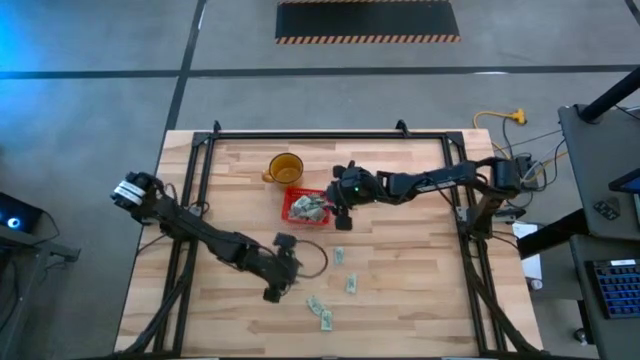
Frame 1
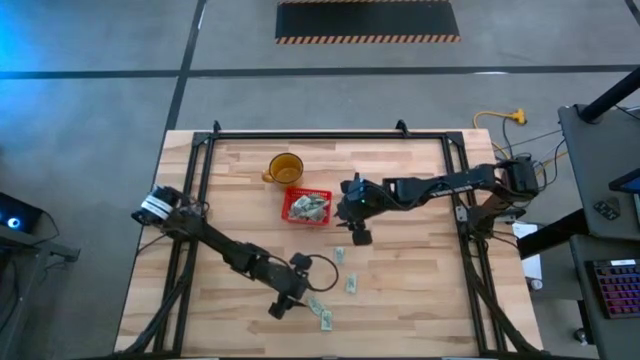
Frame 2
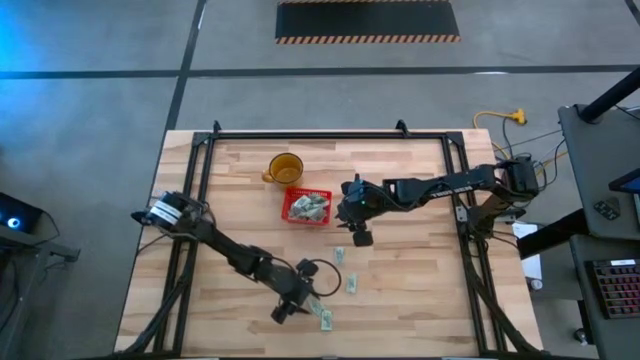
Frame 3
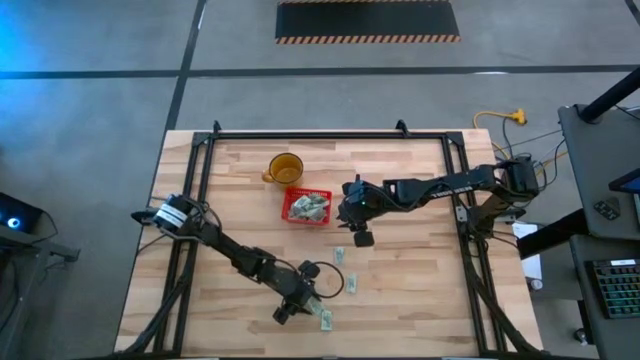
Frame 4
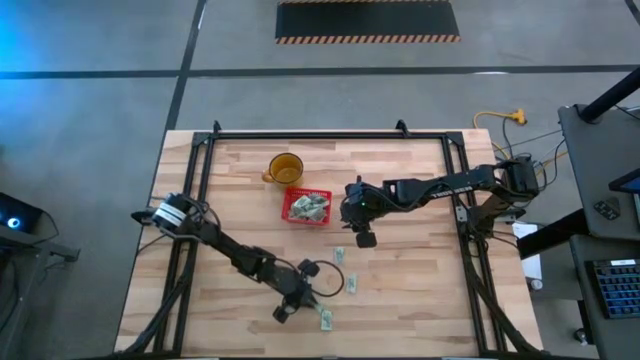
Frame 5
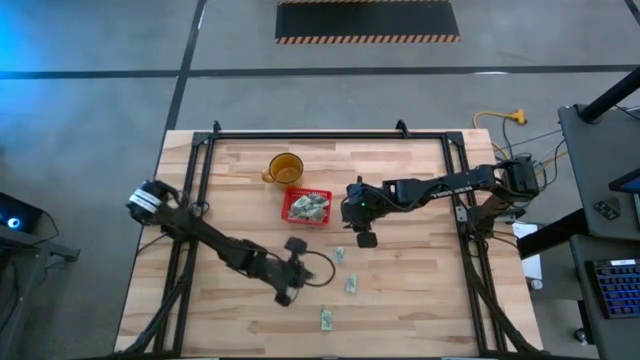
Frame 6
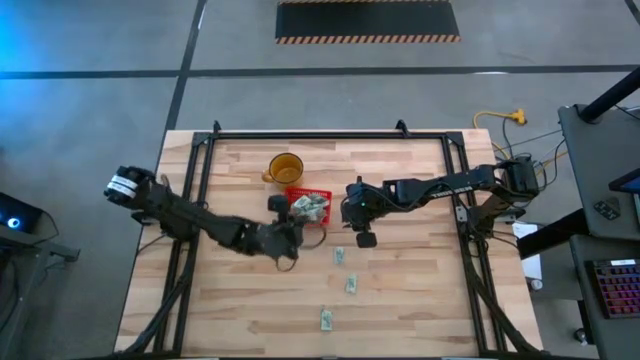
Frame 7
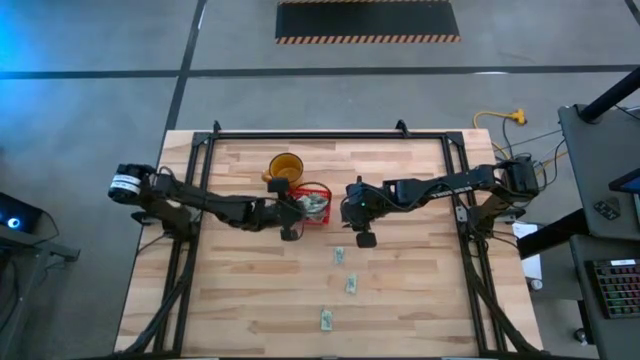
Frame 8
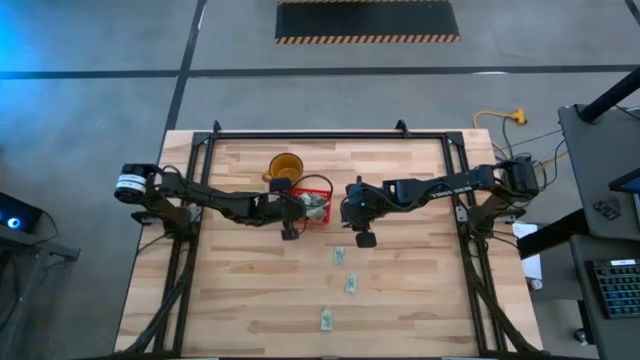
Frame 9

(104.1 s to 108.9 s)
Task: Pick and place Stevia / Truvia into bins
Put the gray stevia packet into the red basket

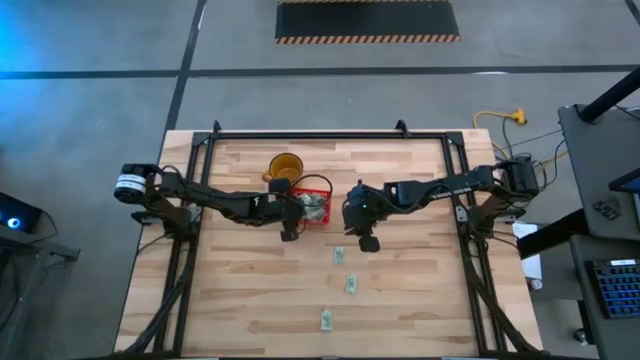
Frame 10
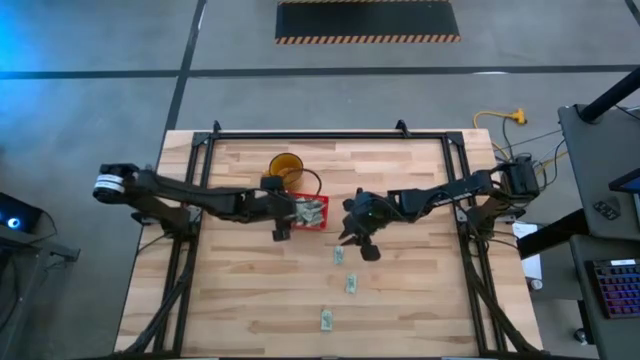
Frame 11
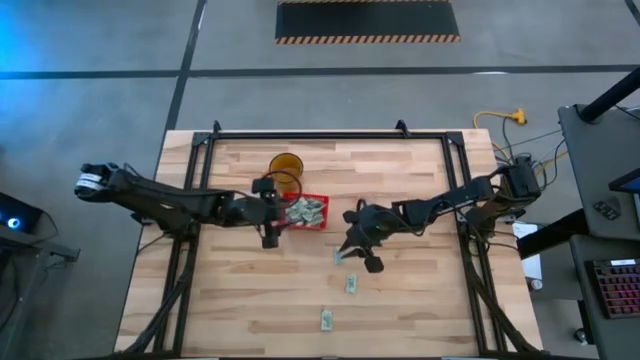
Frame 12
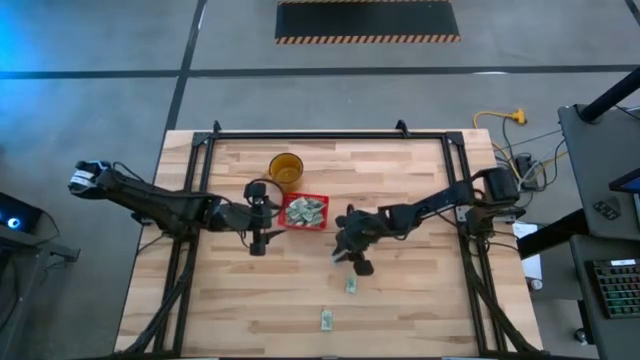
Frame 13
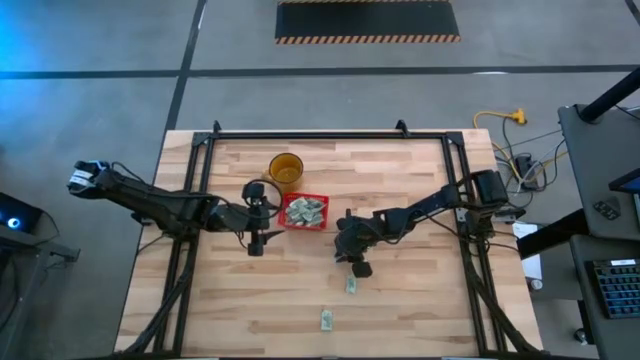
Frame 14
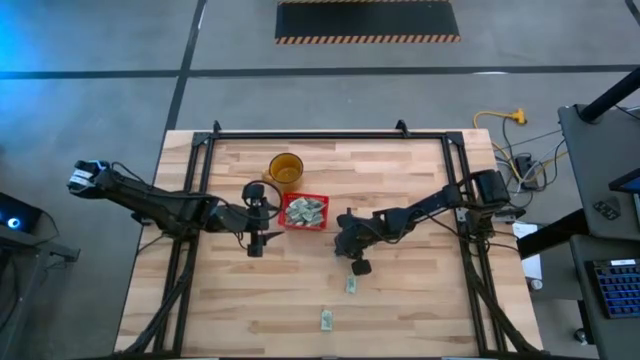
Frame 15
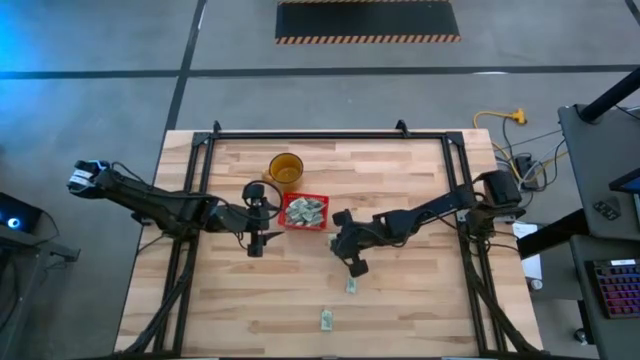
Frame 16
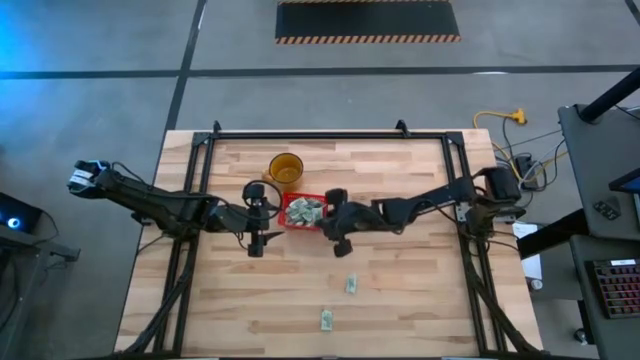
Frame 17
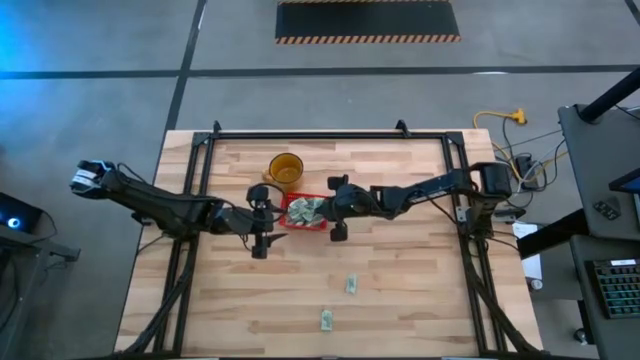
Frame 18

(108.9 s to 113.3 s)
Put the gray stevia packet into the red basket

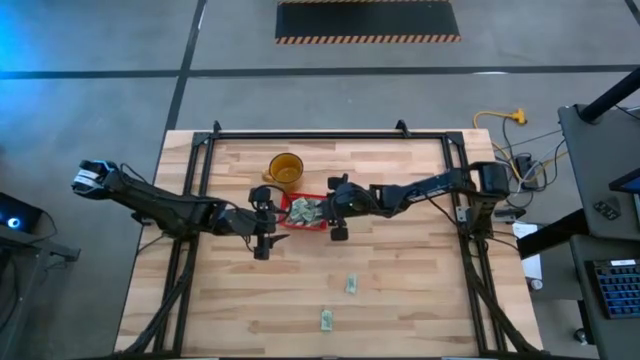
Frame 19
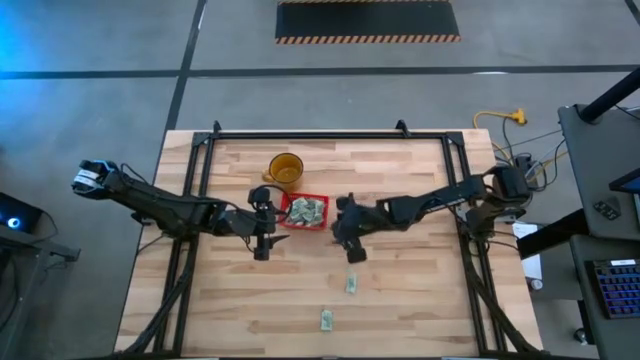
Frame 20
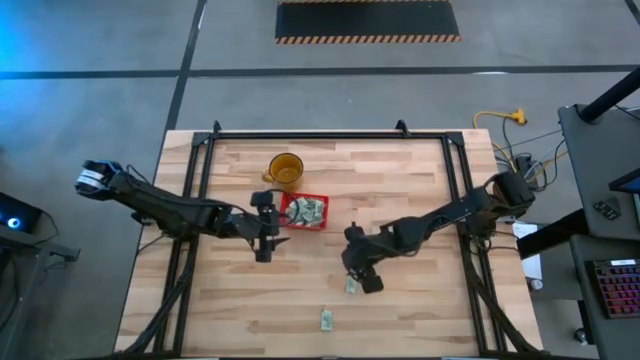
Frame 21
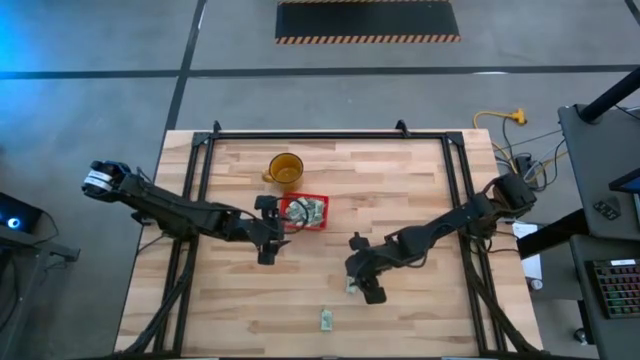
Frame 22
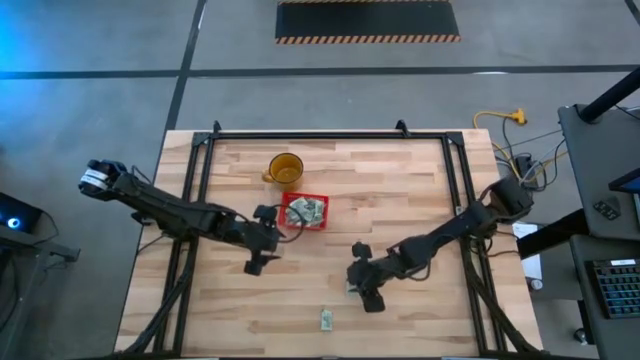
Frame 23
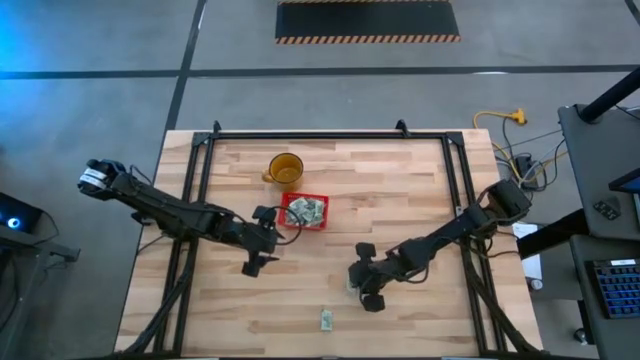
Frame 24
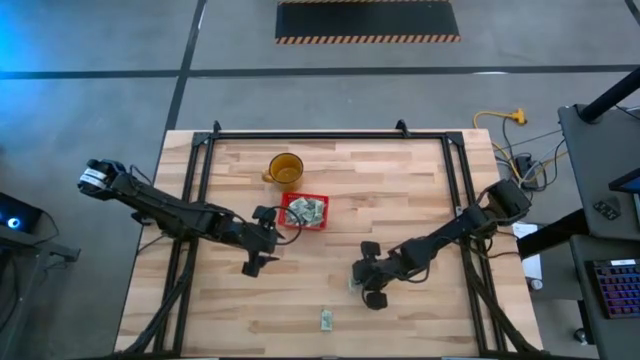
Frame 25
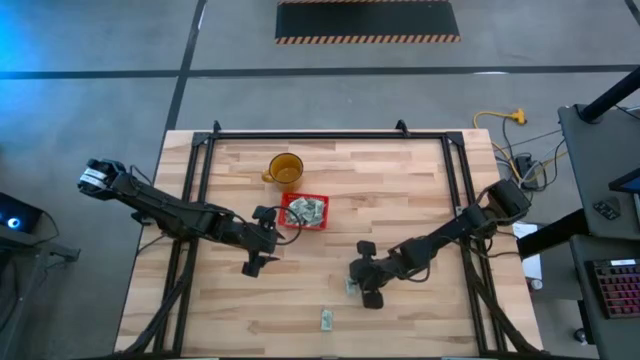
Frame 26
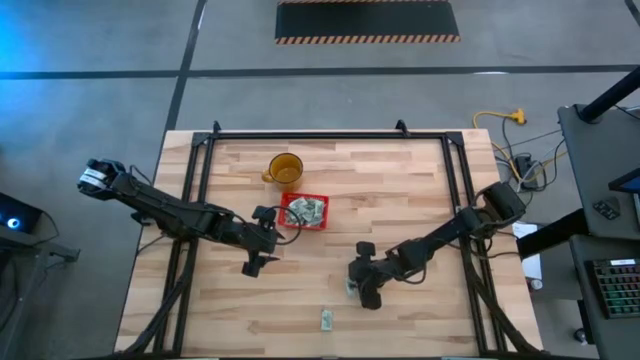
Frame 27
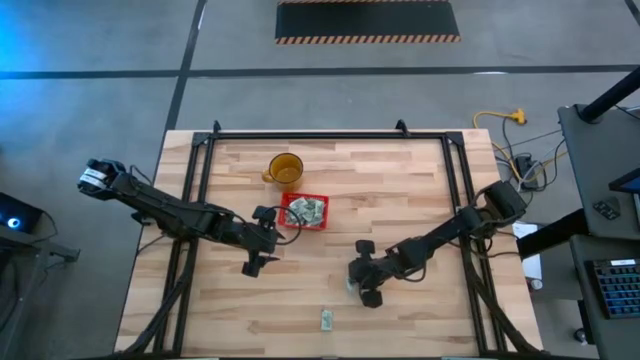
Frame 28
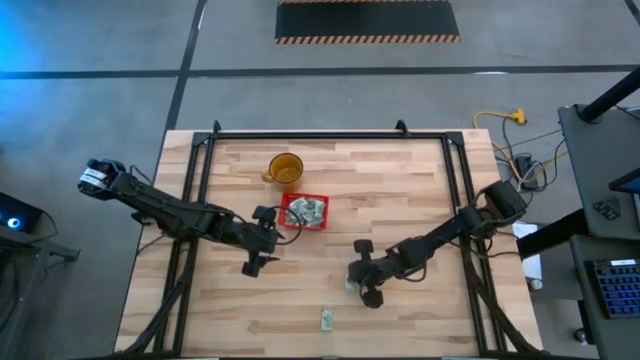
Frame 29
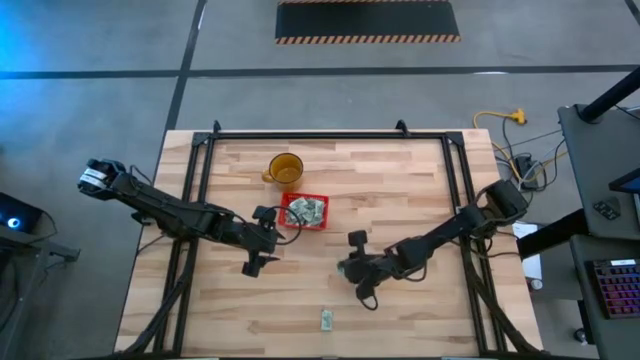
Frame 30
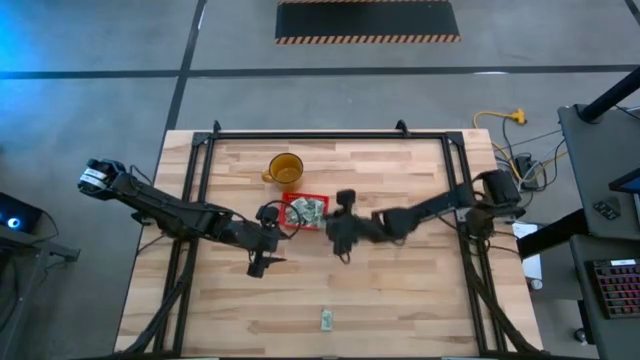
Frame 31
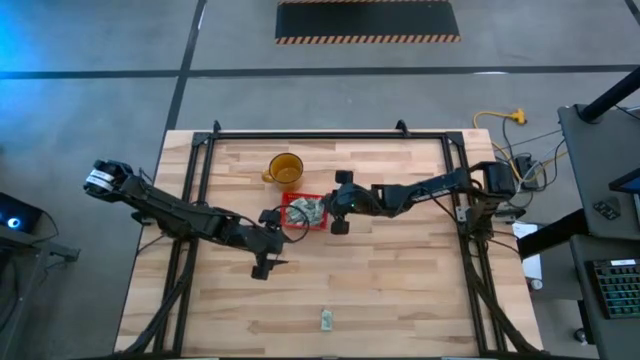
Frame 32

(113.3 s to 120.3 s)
Put the gray stevia packet into the red basket

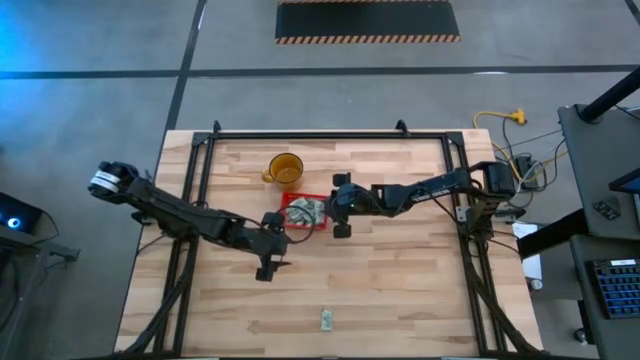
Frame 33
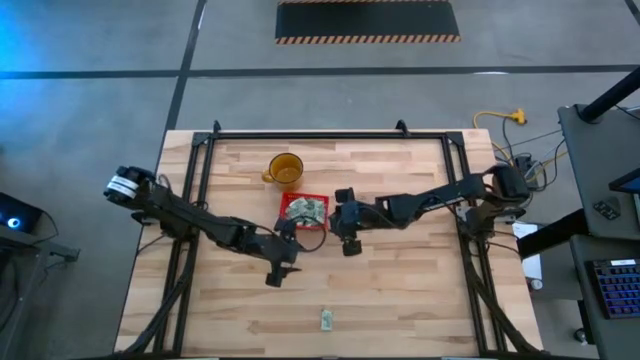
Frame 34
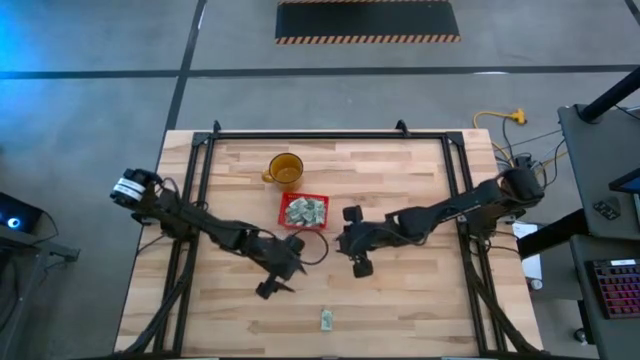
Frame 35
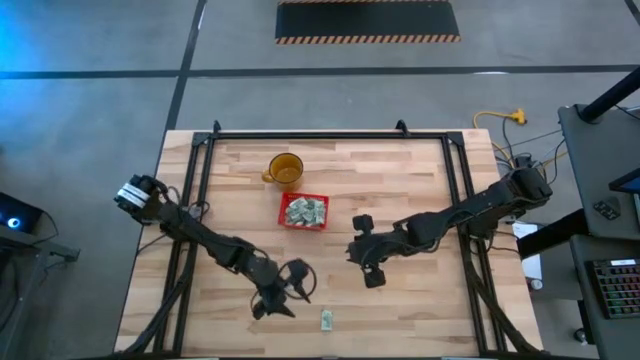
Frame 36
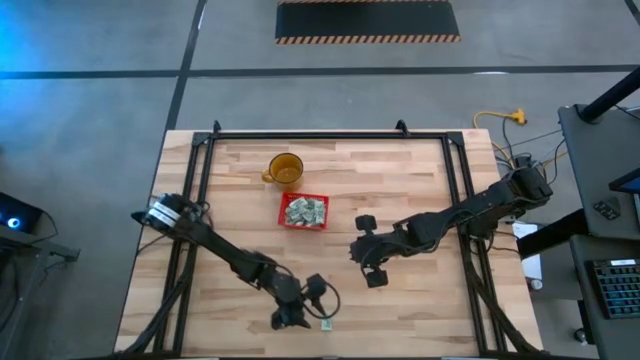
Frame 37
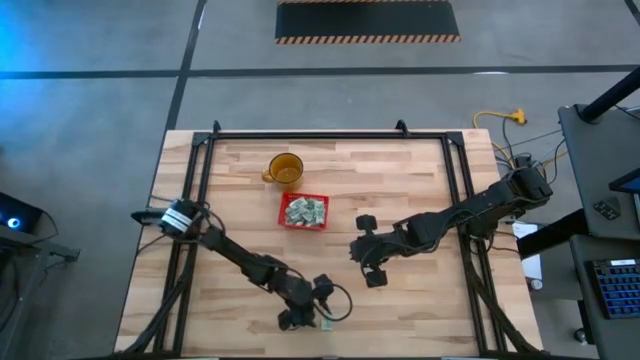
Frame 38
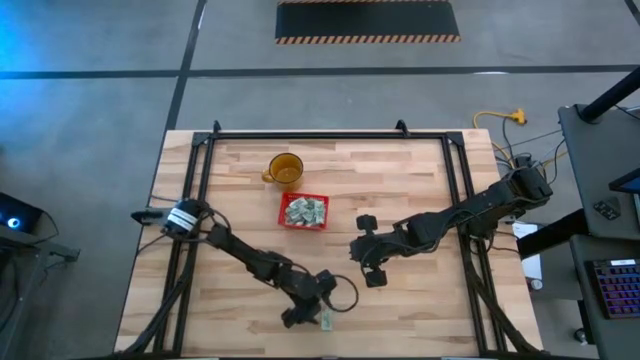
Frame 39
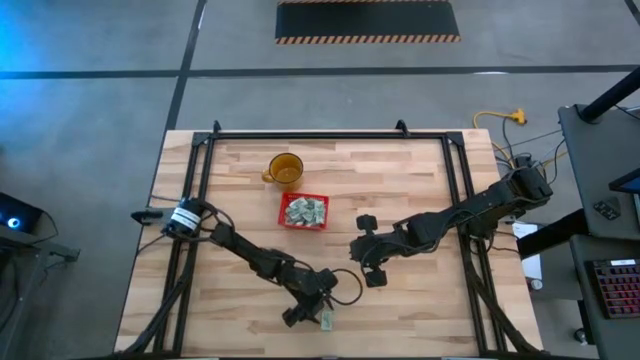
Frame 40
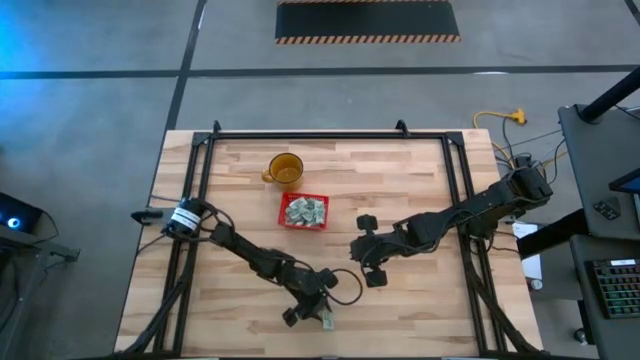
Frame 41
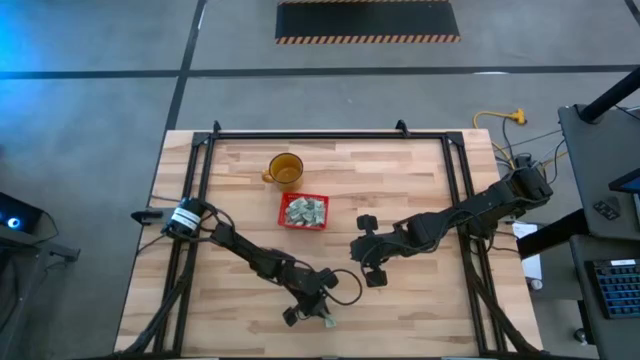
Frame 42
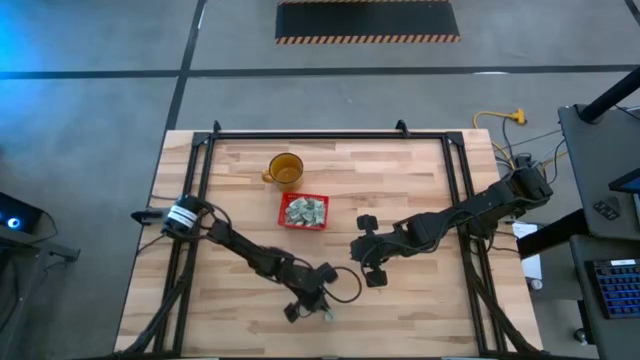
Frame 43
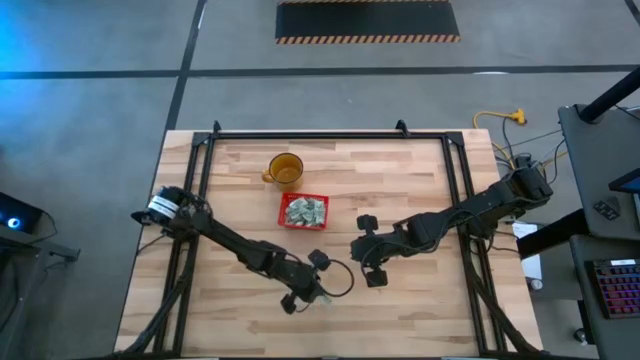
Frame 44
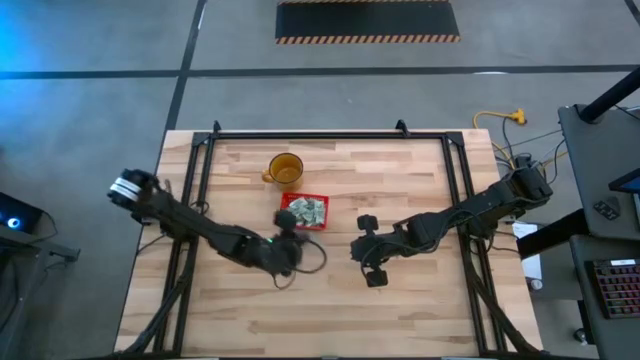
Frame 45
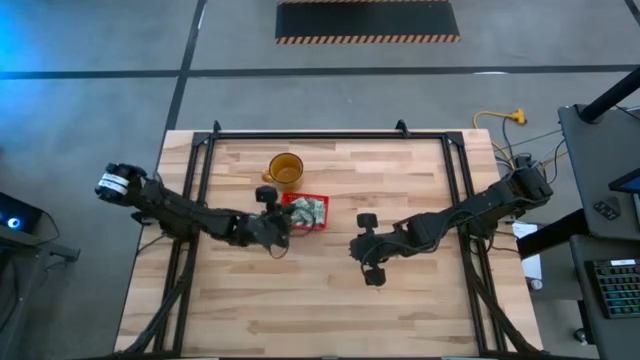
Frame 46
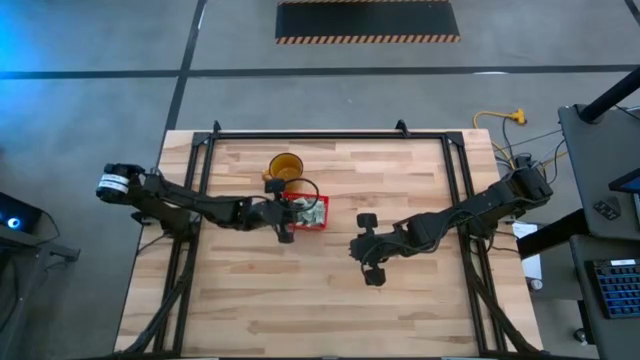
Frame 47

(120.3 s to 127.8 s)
Put the gray stevia packet into the red basket
